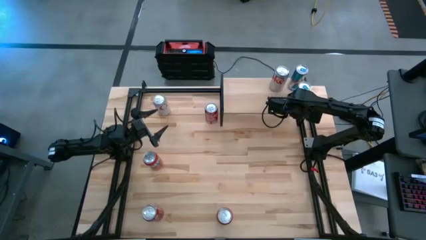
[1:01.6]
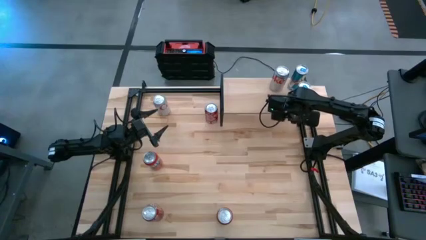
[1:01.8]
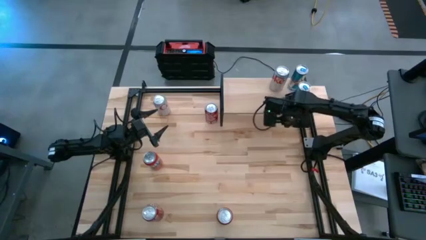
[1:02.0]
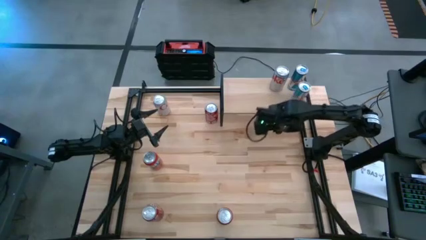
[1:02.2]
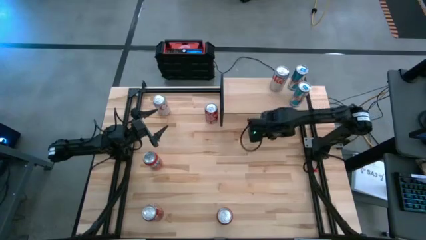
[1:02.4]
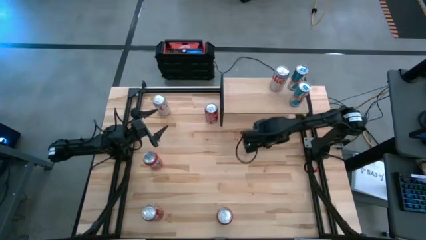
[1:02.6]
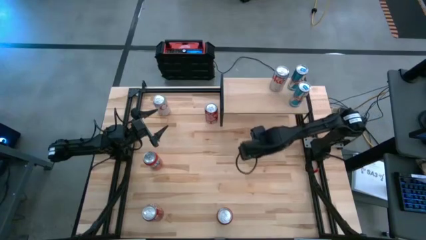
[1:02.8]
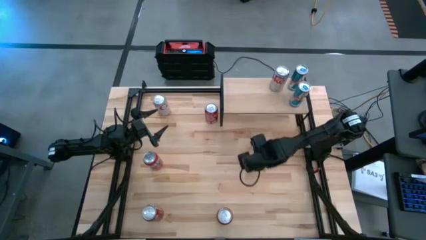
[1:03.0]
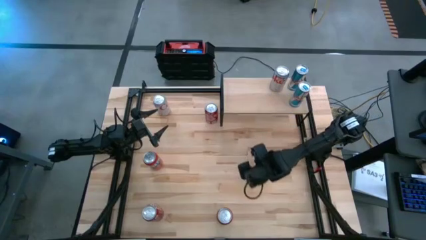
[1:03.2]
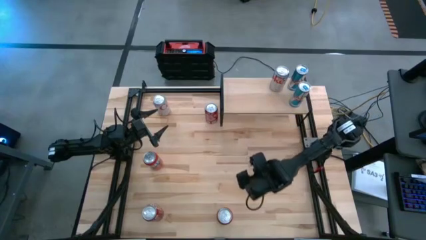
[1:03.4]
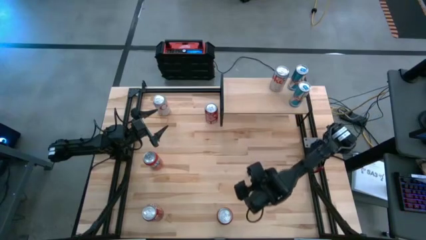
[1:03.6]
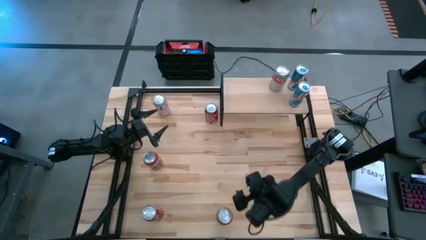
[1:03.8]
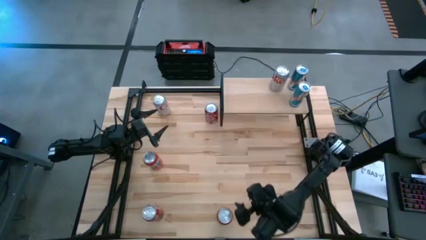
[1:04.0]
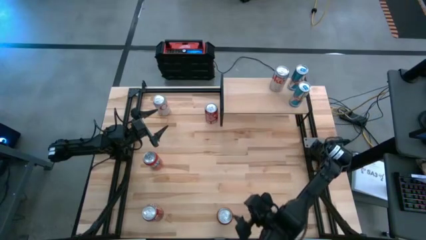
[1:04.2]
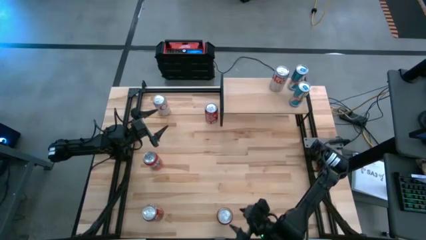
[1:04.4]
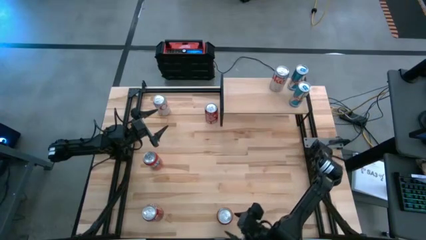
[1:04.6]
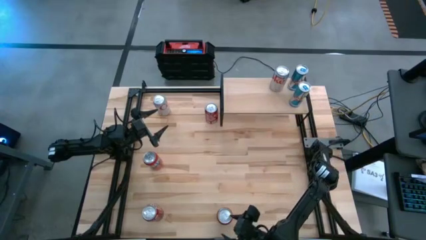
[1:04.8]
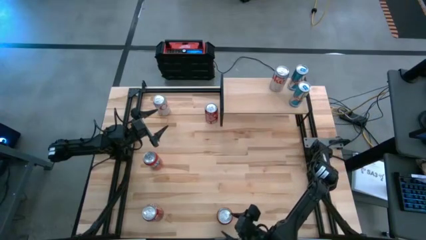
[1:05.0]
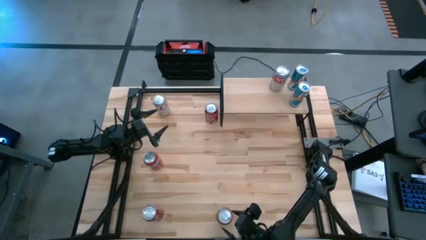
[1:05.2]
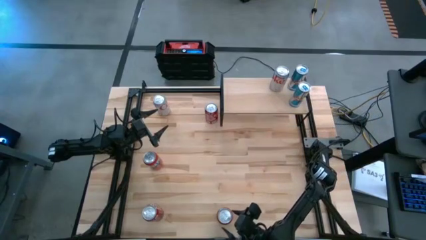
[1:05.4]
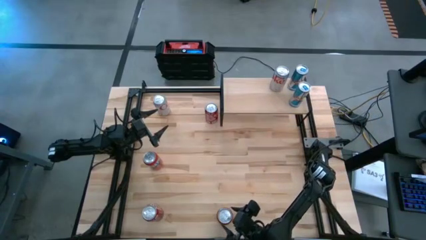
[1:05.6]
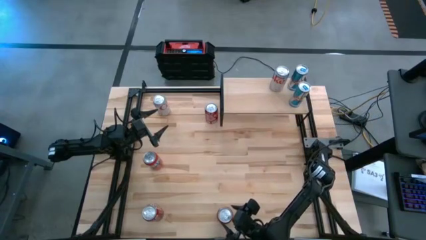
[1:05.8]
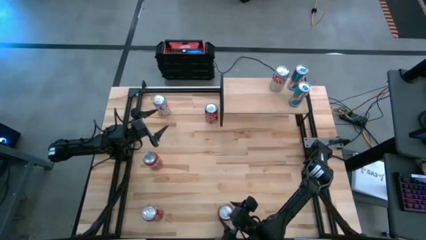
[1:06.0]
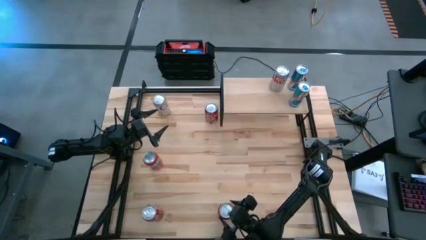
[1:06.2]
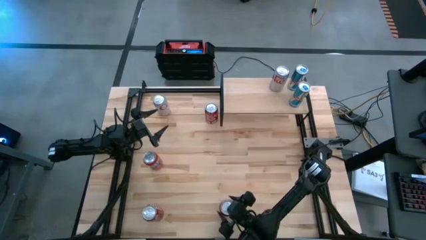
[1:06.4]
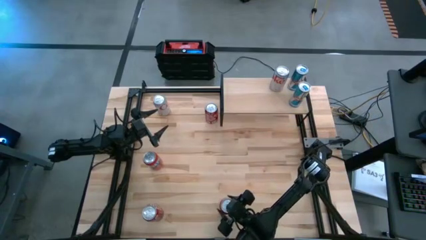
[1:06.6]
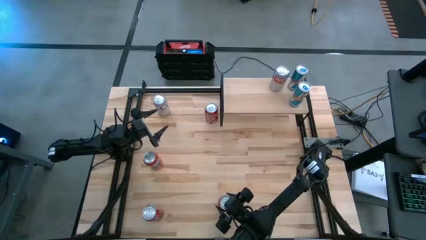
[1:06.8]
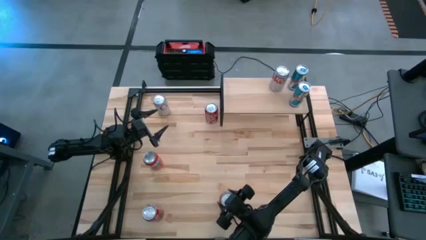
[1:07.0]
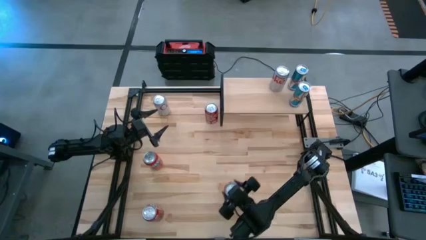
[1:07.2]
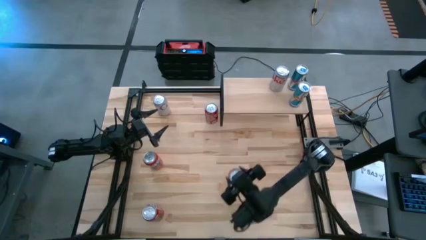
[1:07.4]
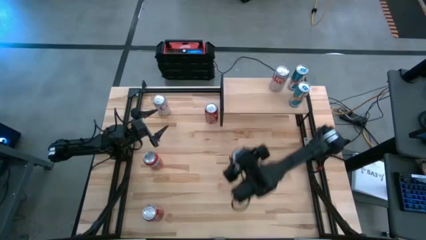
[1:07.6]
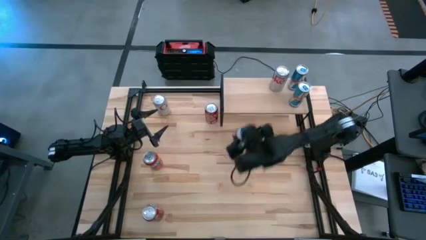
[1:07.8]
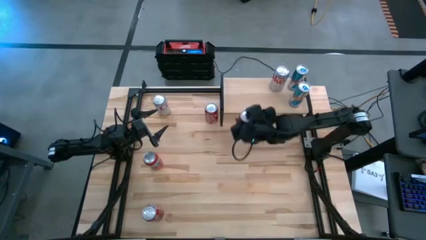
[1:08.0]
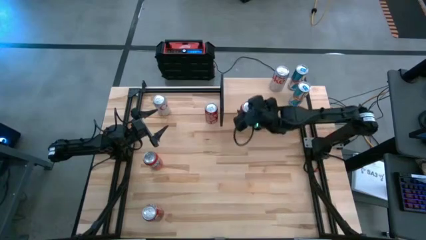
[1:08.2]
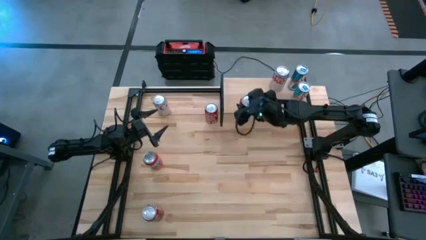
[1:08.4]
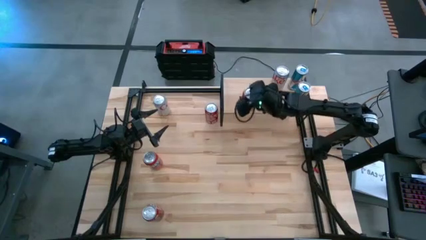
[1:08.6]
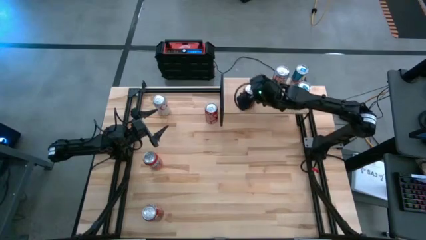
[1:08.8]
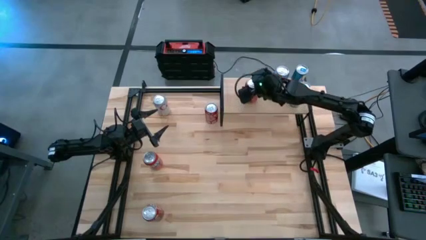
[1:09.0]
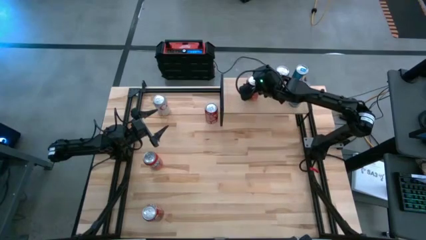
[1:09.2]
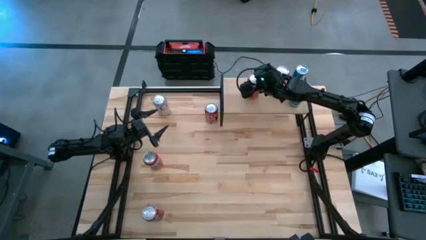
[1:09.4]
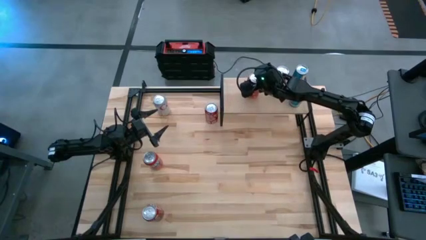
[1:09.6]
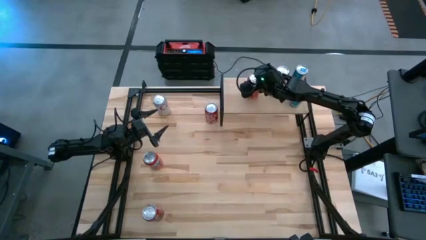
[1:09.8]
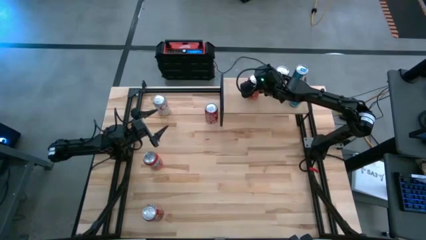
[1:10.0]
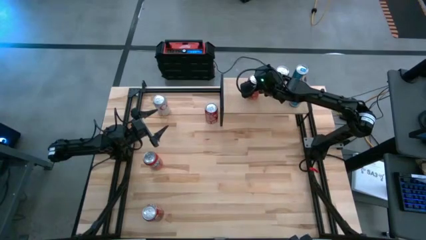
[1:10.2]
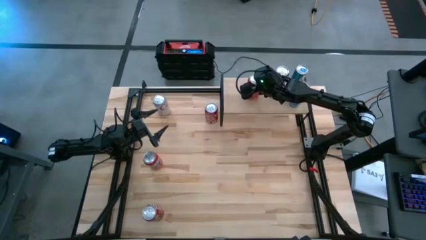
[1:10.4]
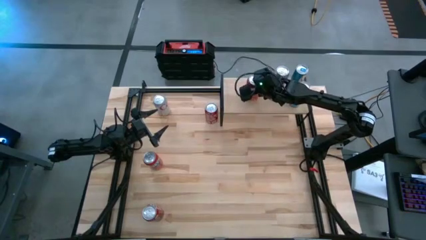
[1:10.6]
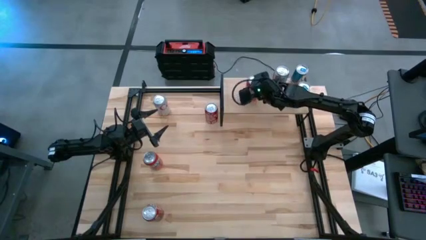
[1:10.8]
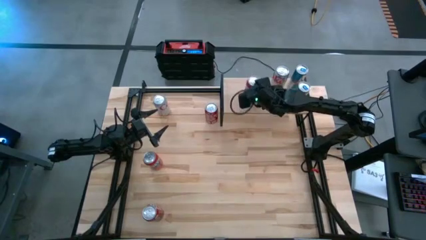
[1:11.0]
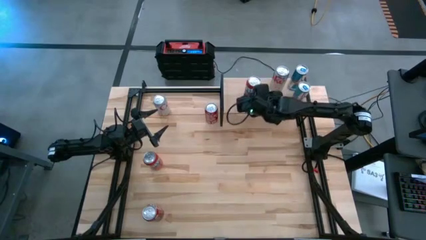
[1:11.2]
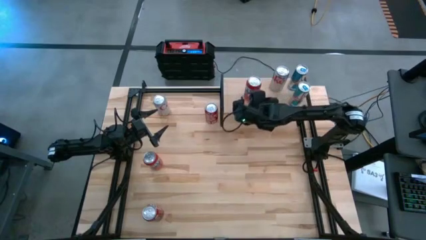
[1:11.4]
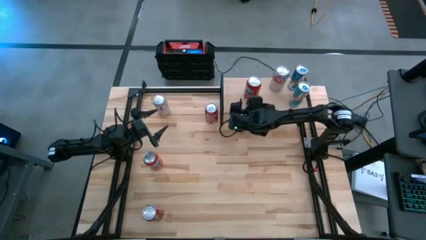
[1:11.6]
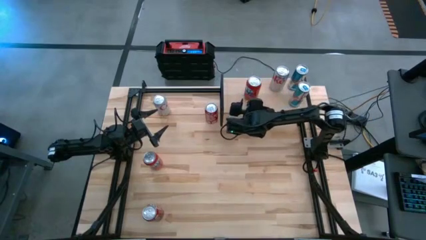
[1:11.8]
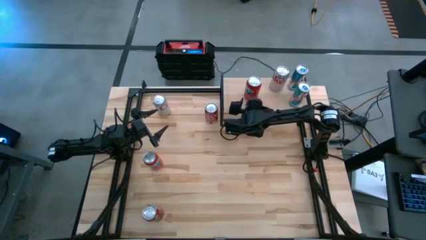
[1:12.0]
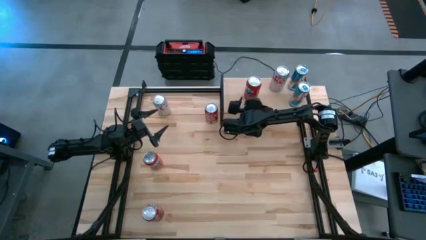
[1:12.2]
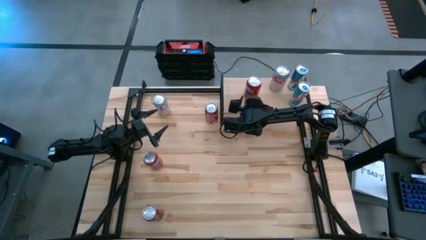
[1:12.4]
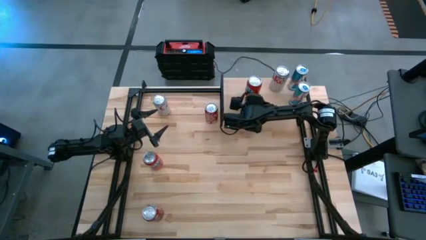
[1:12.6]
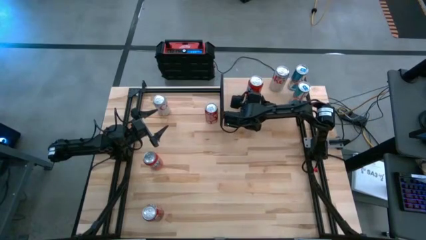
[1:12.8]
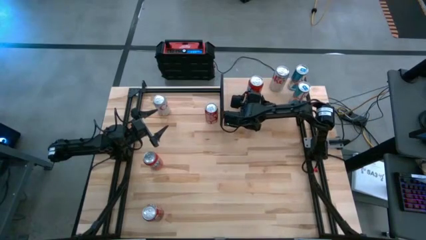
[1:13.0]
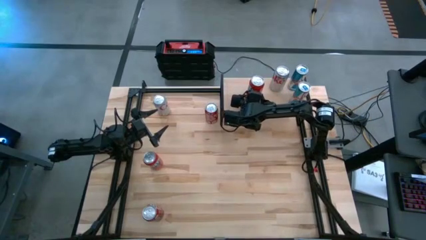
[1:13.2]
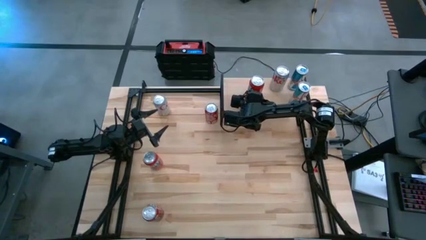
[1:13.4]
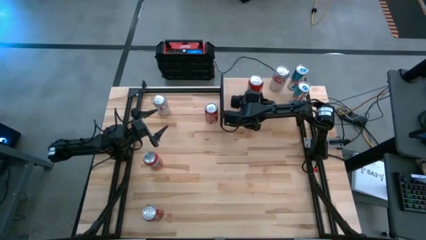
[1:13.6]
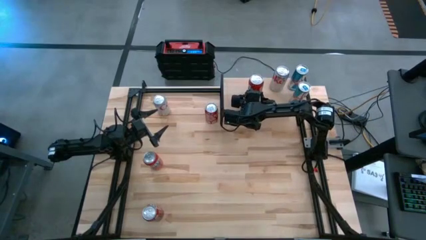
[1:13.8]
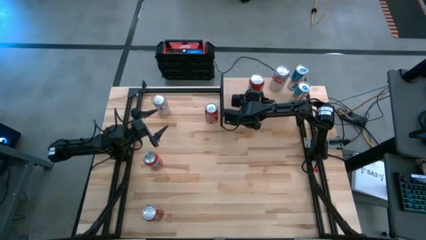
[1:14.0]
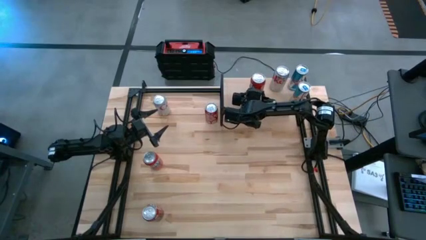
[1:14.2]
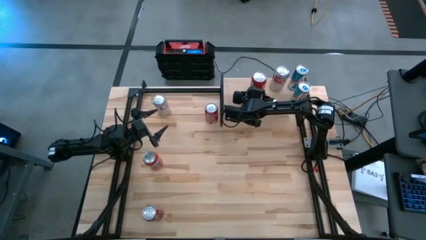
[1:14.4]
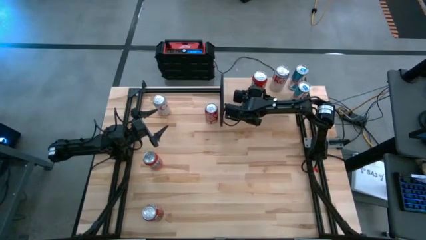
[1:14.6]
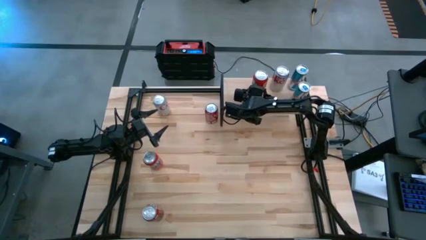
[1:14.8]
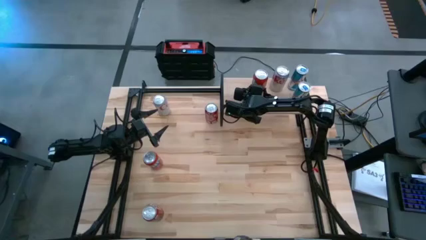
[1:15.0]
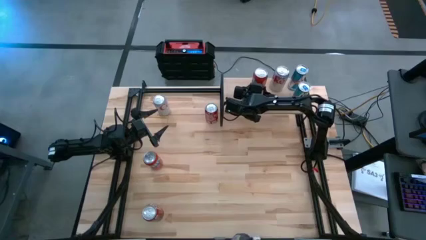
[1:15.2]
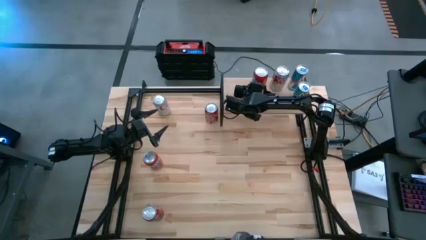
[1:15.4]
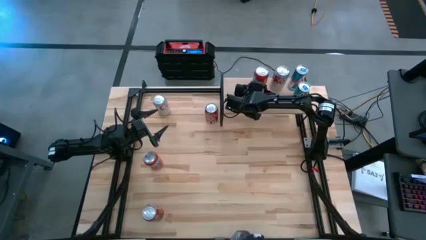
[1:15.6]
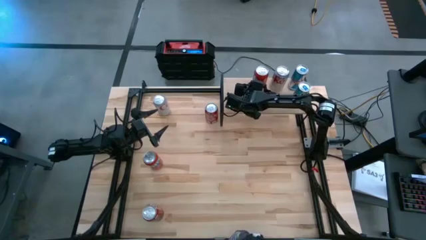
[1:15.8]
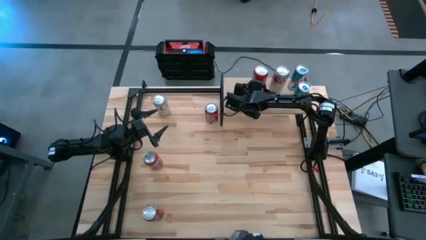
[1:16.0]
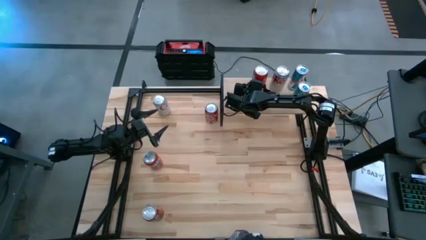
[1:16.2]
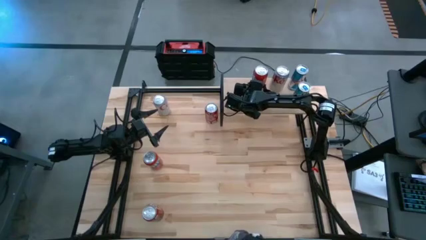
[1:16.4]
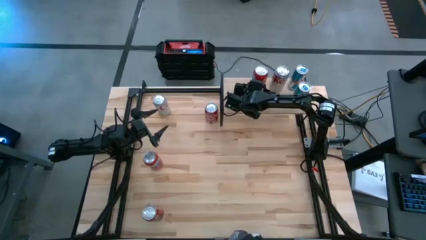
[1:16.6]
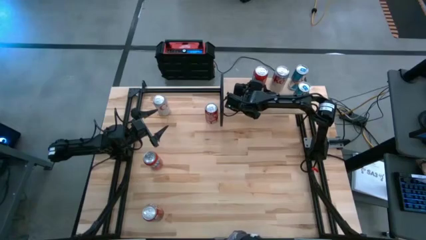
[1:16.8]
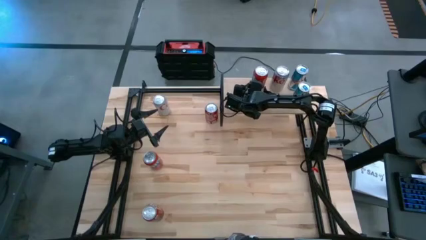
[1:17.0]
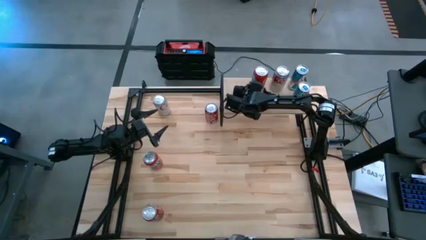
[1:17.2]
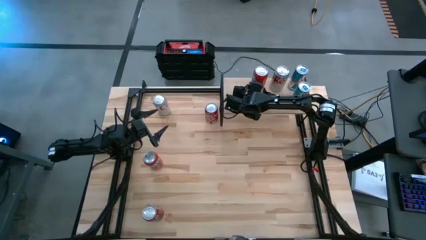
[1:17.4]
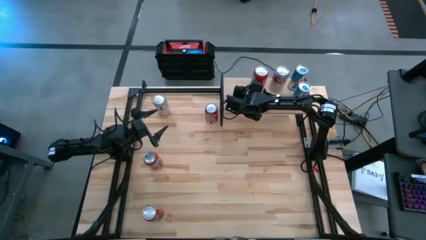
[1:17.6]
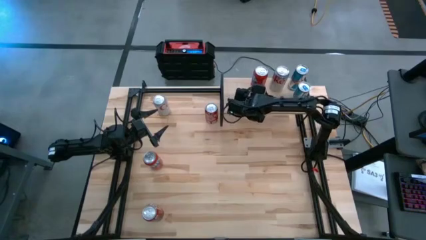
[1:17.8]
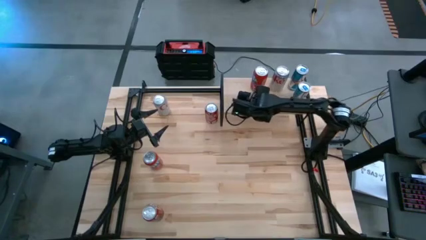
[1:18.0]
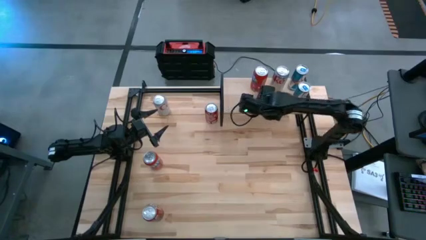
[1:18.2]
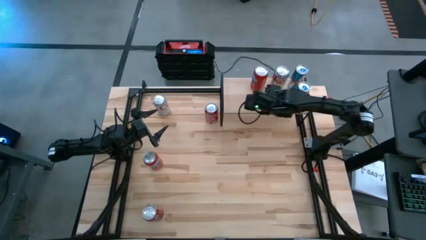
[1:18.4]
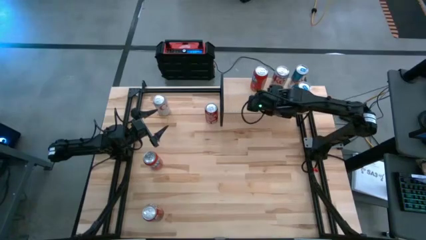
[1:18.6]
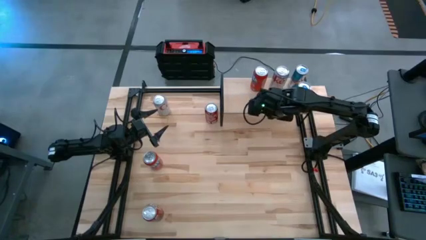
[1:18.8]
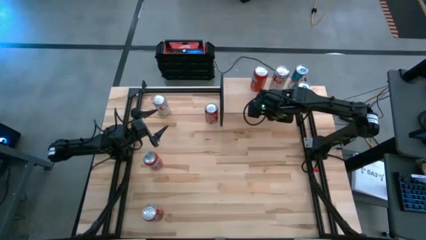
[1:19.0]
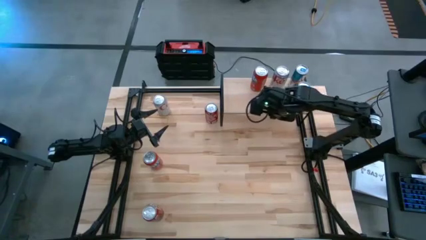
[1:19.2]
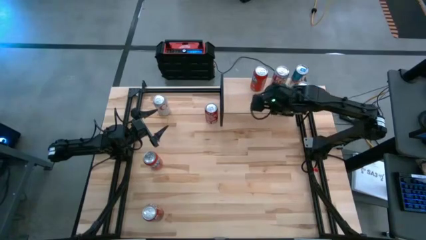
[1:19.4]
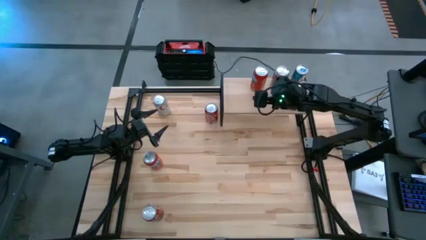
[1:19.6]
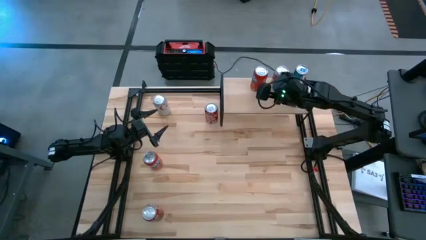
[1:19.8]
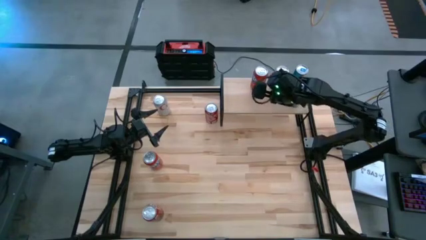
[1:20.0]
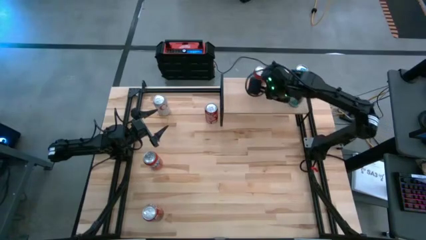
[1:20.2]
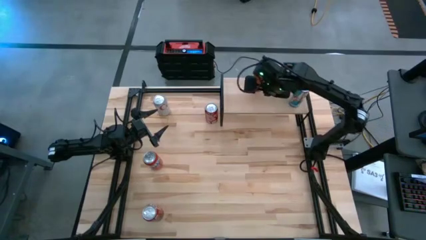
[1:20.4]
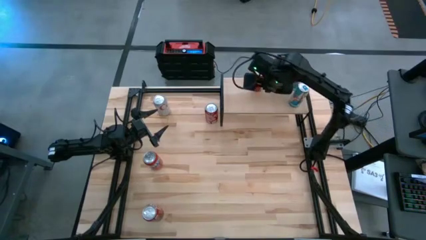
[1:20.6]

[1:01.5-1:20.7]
Task: Place canned beverage on shelf
Put the bottom red soda can on the shelf
